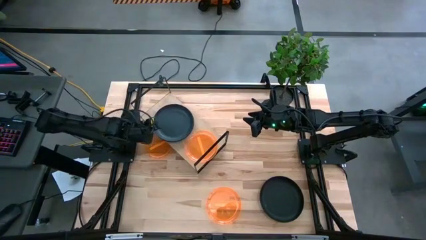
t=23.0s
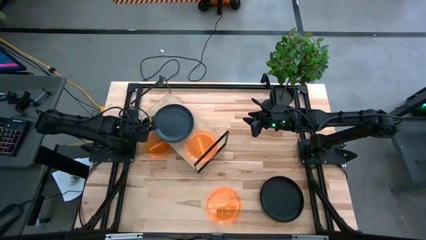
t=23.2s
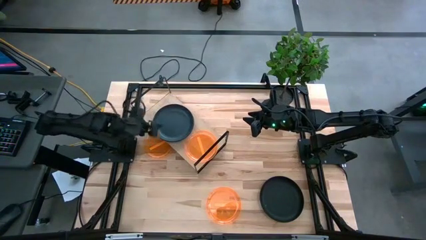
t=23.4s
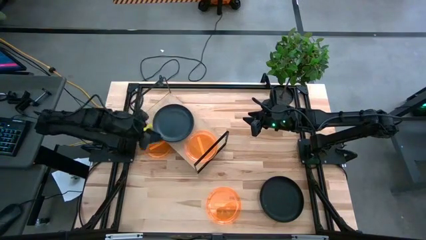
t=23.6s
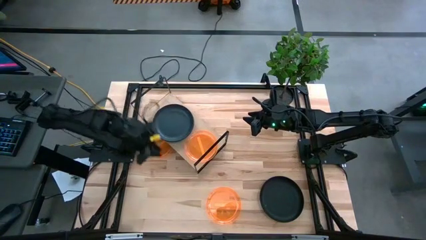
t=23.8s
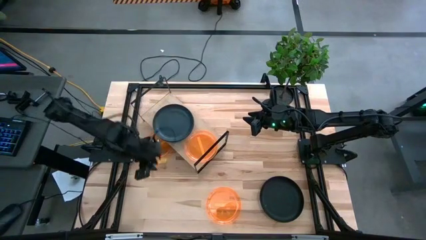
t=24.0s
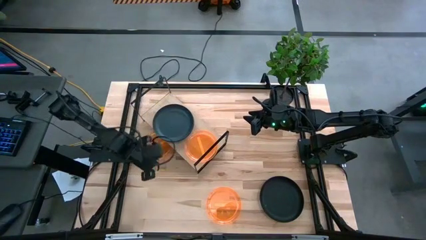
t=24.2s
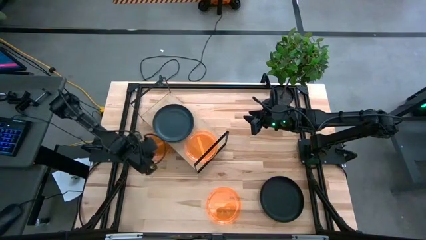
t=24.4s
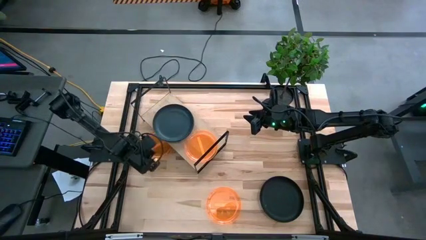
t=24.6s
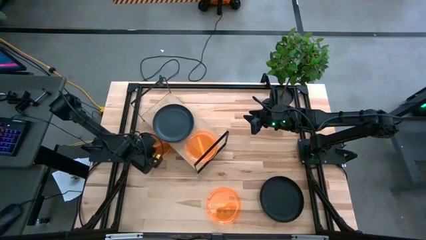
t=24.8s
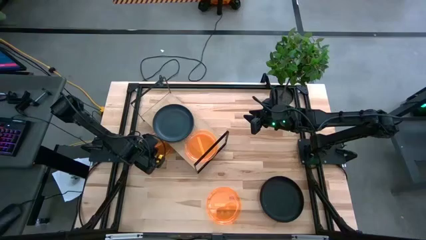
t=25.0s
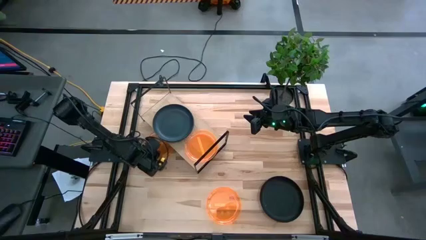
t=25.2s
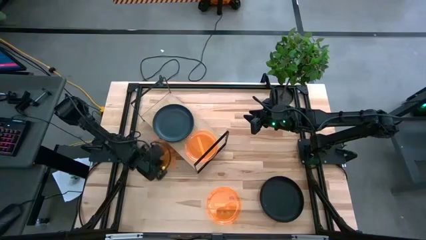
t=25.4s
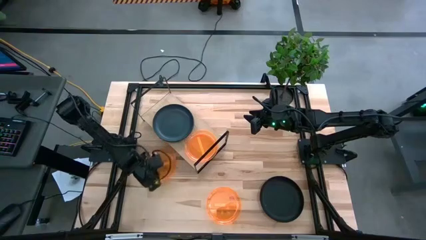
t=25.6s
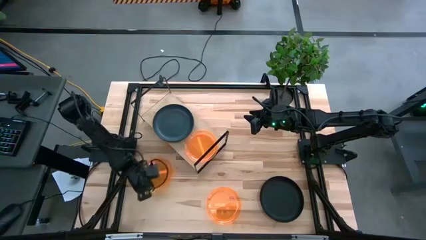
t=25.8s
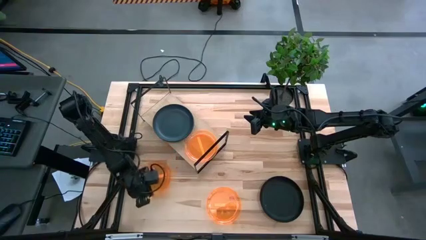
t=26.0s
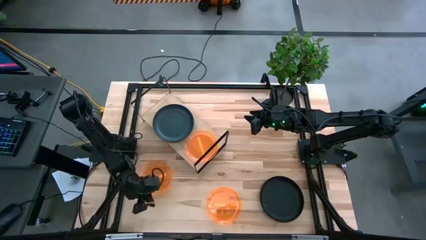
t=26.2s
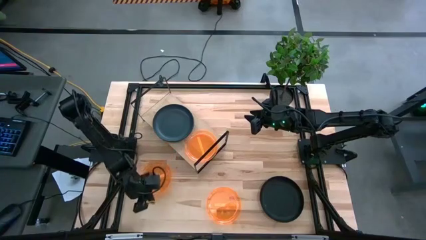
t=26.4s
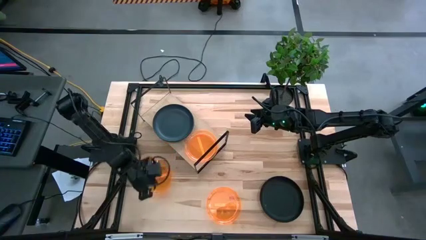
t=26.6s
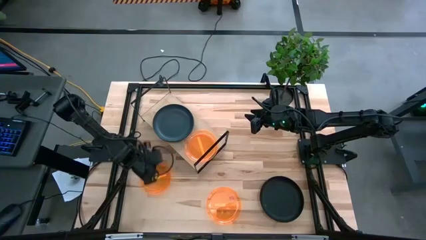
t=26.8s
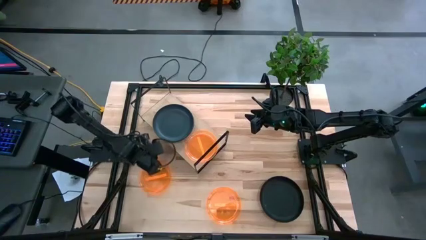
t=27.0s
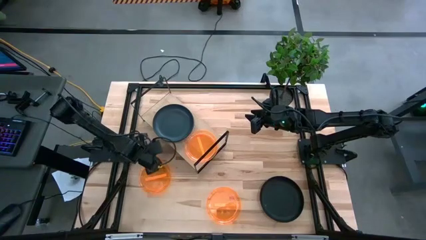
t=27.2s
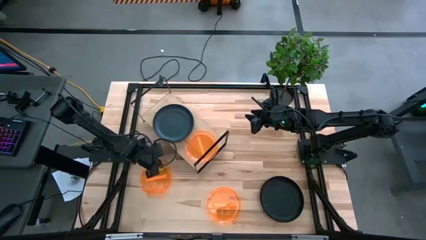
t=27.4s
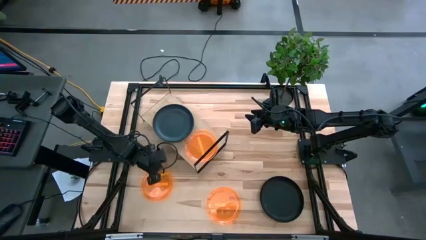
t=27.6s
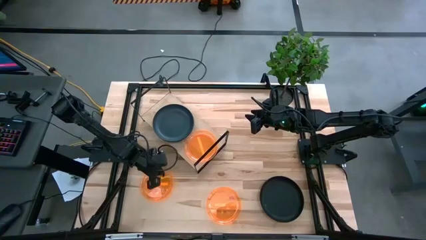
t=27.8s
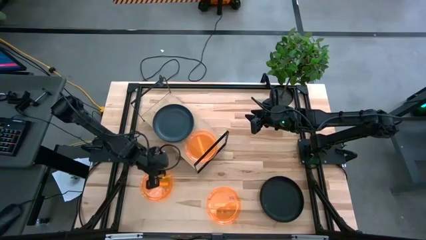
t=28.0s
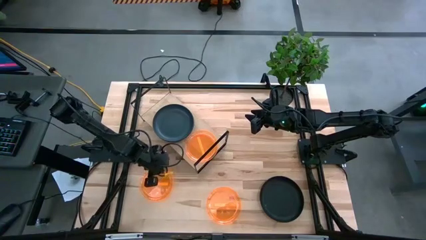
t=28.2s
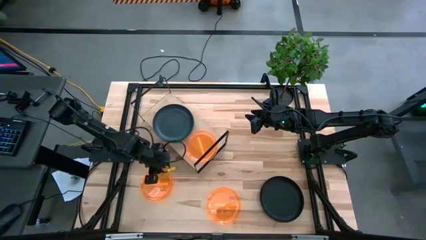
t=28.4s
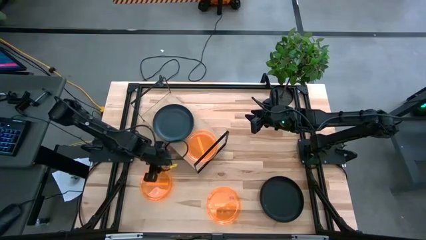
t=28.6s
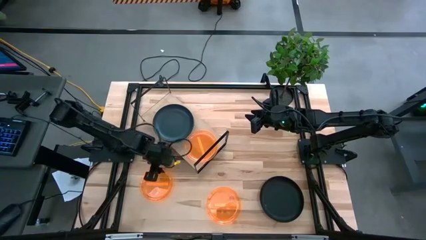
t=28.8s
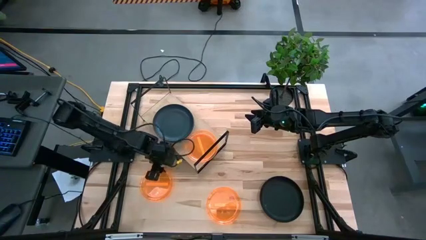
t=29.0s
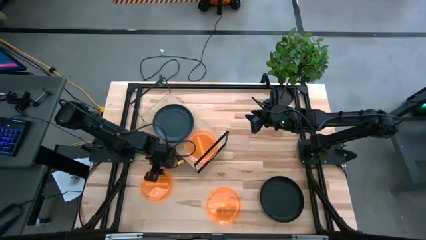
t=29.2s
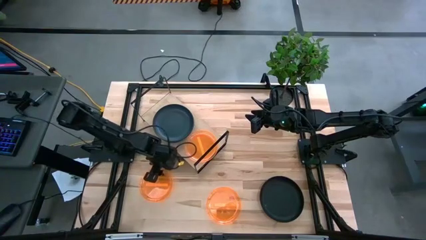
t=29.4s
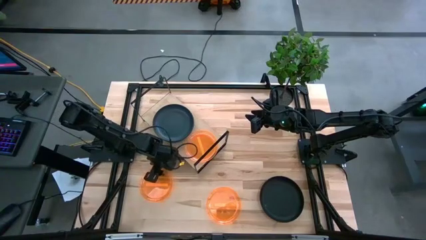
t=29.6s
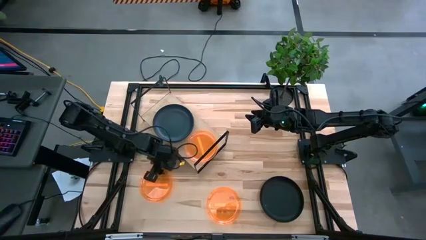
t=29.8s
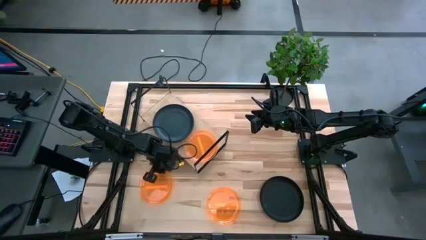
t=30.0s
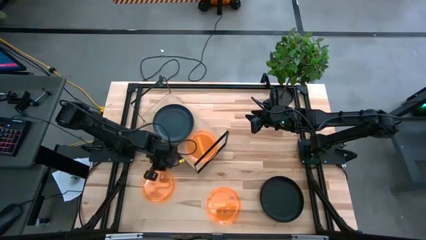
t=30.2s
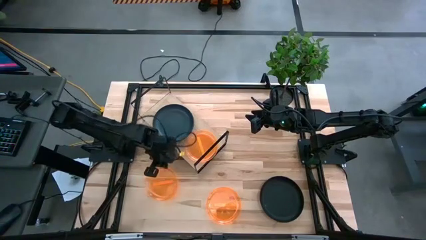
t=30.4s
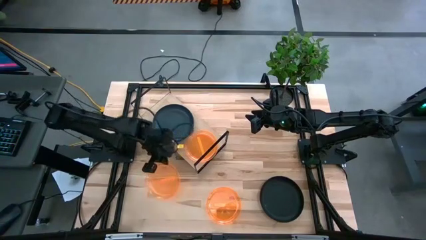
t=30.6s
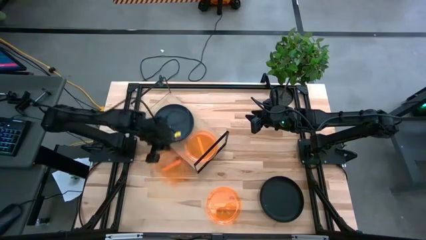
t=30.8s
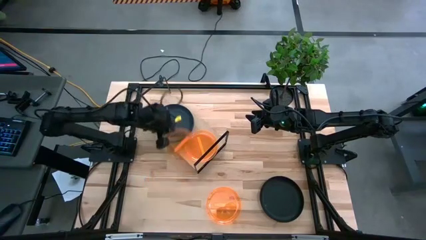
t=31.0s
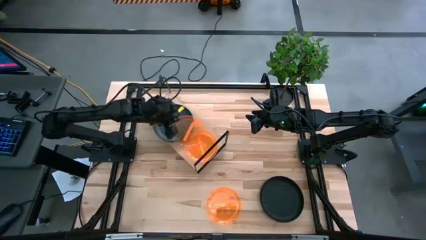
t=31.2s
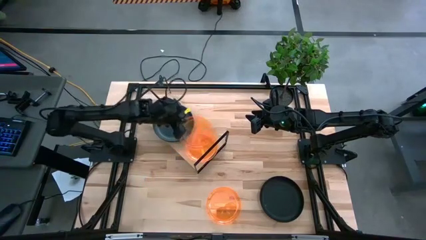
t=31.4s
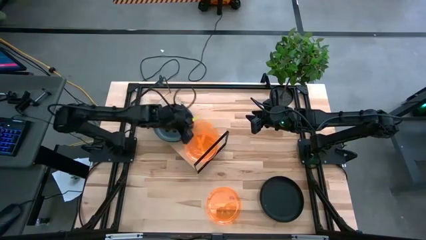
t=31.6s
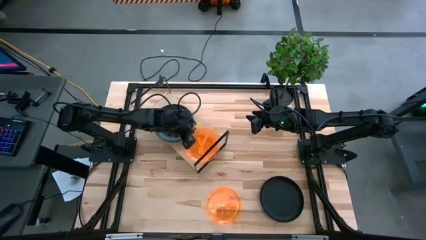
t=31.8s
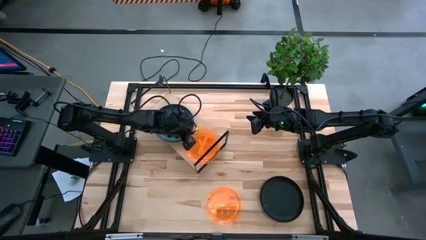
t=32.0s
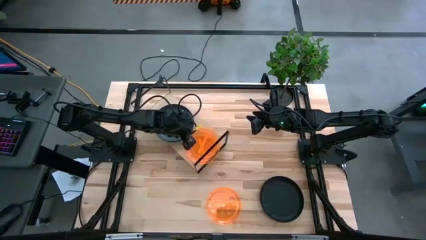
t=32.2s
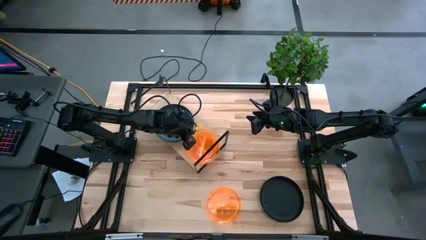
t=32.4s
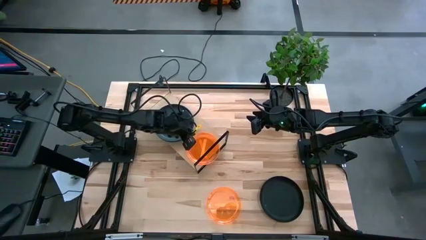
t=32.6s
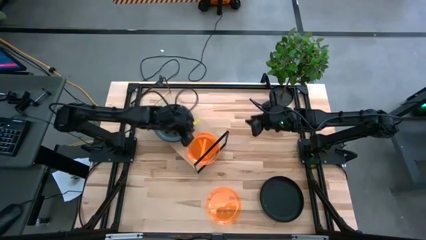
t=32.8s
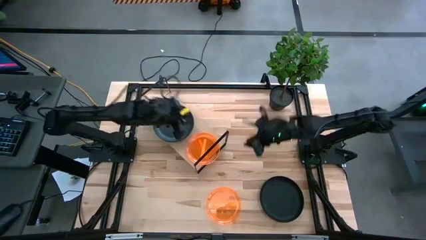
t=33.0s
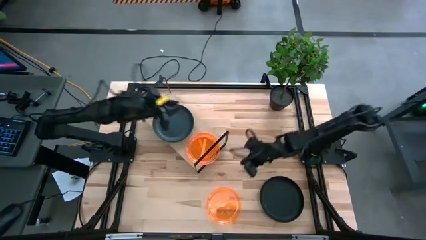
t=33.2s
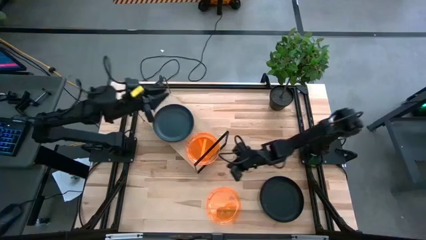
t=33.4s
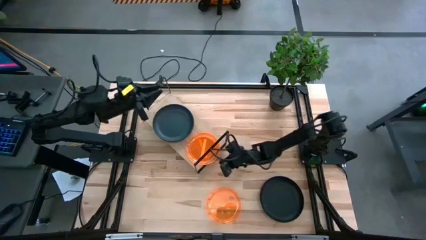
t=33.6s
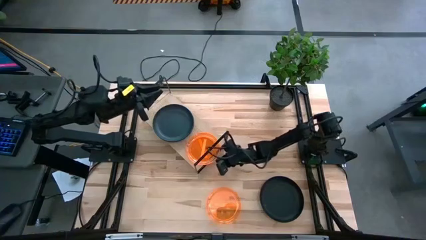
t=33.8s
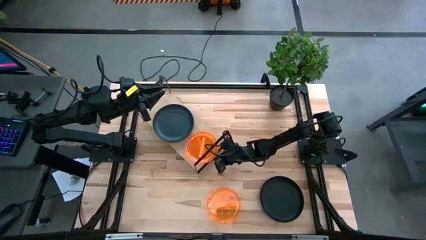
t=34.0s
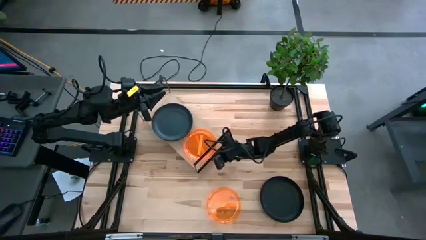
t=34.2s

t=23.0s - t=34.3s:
Task: Place and stack plates onto a shelf
Stack the top orange plate on top of the orange plate on the shelf

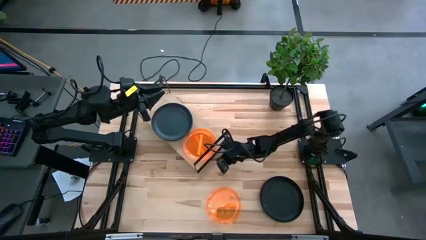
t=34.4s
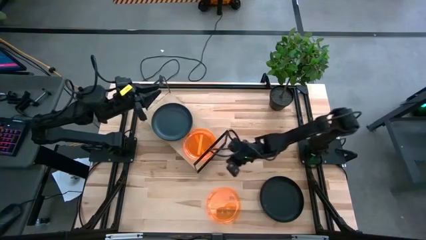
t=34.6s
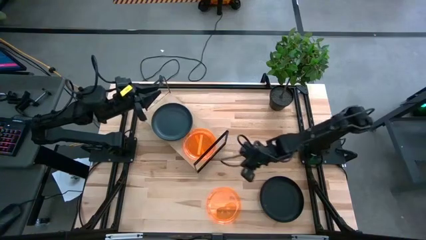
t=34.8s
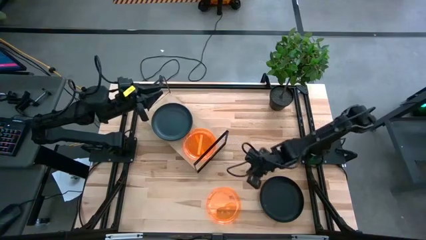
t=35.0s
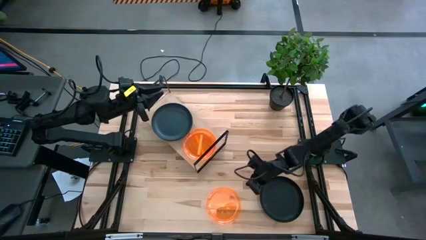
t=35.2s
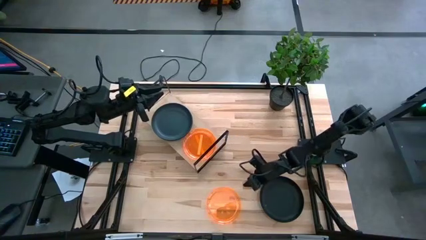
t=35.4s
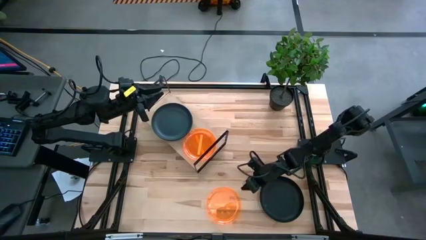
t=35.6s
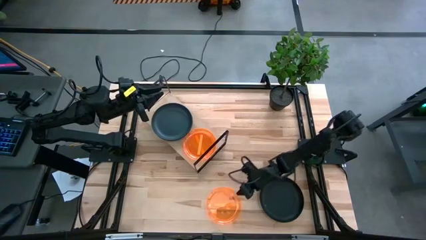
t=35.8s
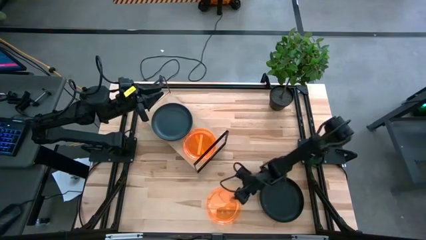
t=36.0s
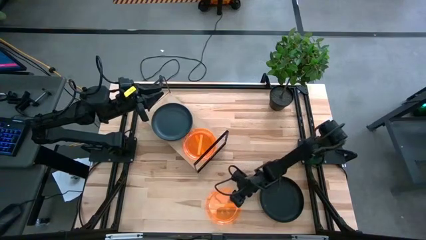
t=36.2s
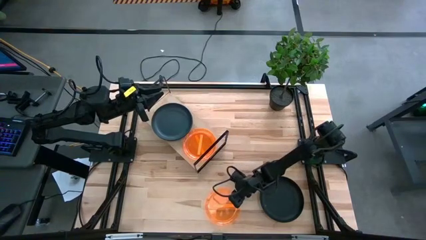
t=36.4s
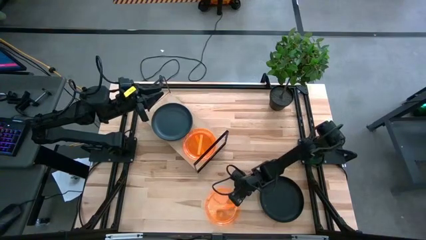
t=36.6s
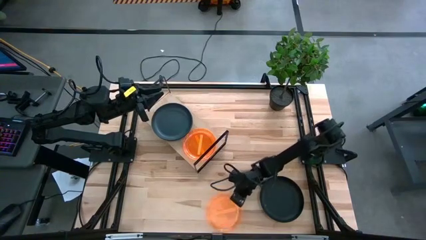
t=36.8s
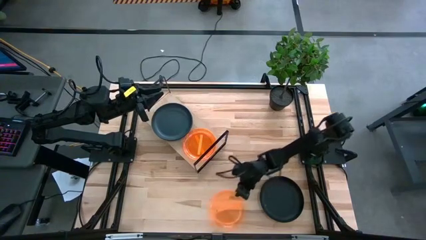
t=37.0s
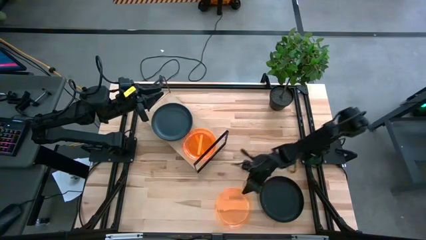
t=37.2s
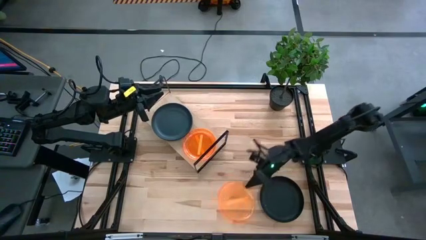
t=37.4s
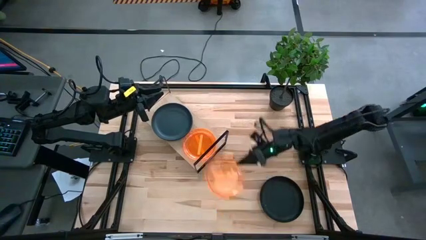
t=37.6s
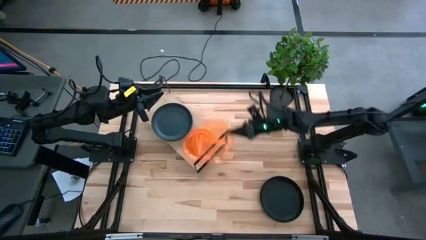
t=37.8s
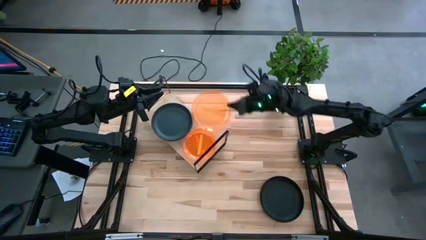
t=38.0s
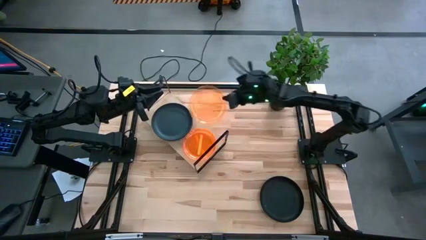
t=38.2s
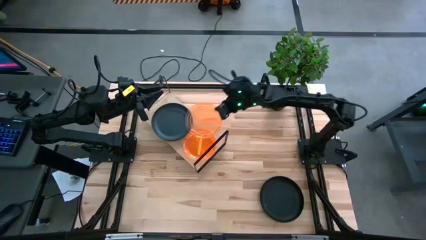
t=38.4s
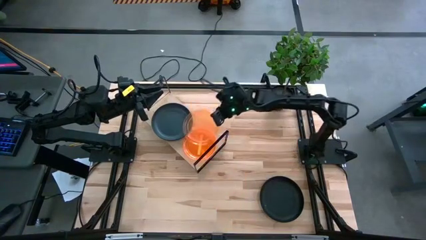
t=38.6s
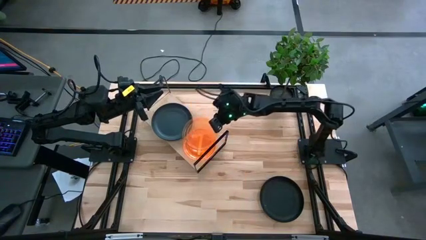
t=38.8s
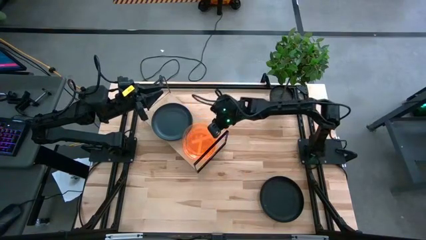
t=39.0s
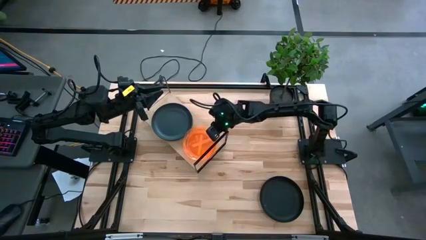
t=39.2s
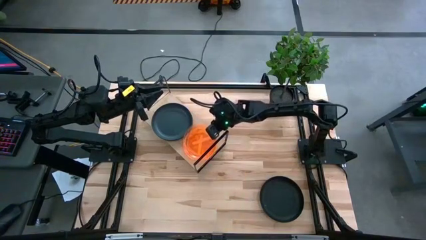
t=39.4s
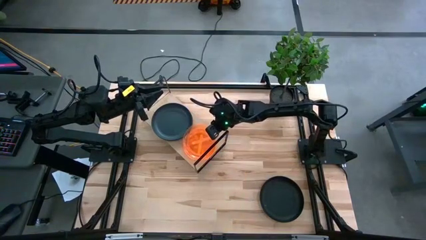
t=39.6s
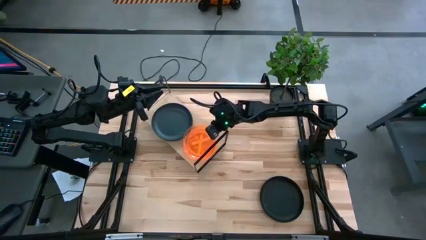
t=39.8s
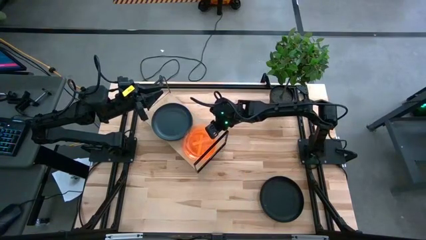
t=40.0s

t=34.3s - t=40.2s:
Stack the orange plate on top of the orange plate on the shelf
